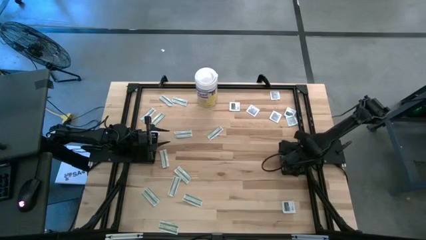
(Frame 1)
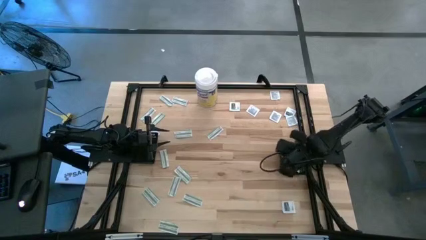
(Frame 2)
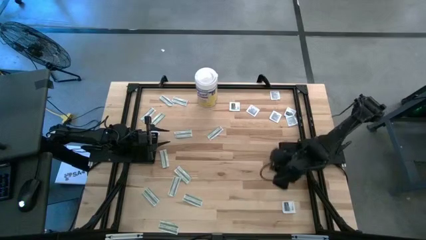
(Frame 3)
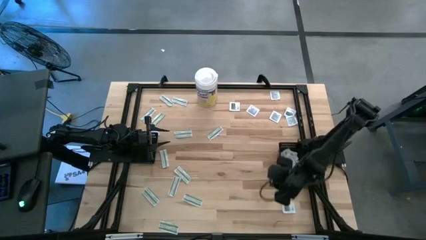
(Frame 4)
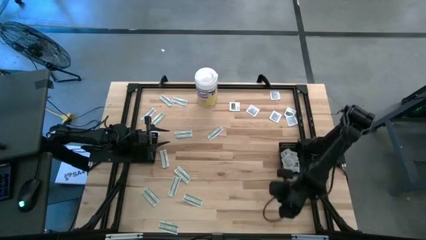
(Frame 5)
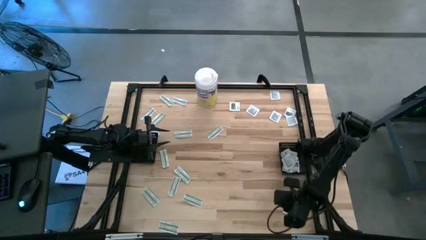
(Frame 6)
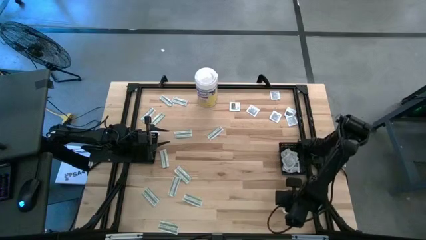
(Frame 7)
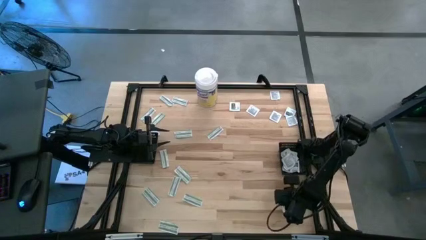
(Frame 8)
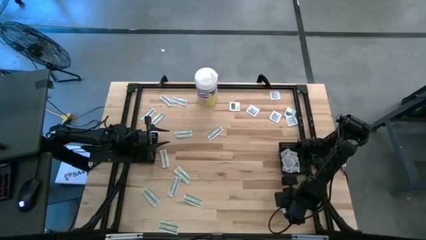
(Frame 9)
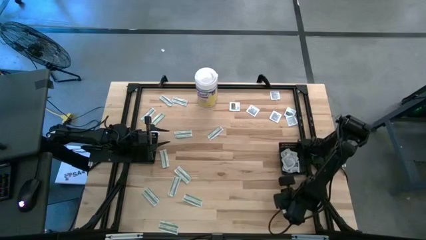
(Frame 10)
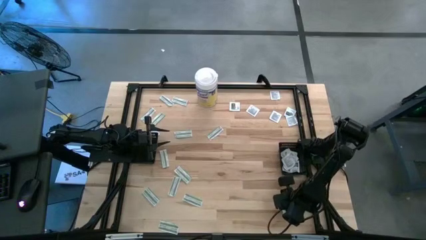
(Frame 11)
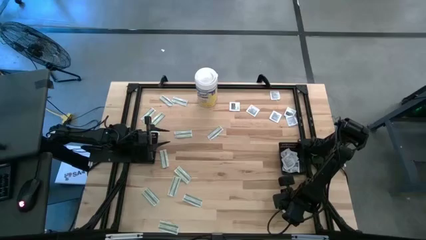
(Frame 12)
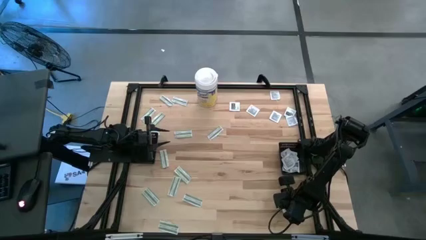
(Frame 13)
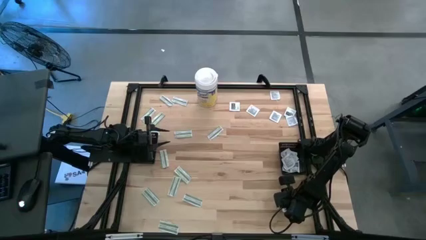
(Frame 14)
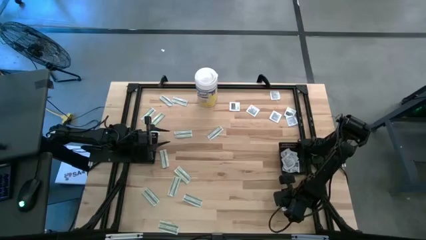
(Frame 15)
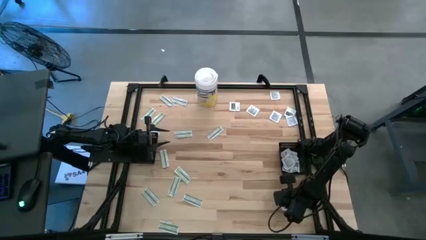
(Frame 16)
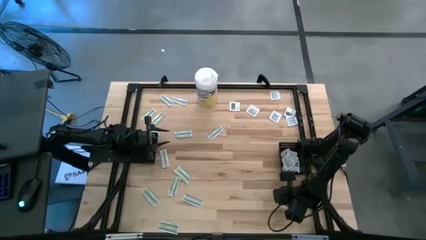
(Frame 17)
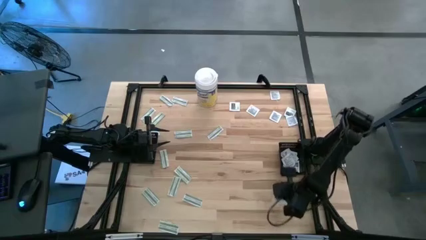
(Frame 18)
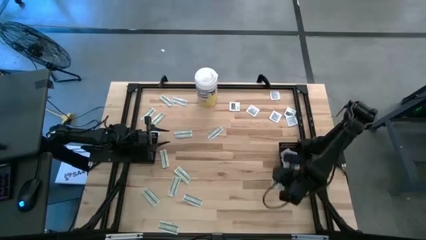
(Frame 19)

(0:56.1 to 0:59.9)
Task: Pick & Place First Aid Supplies
Put the towelette pack into the right black basket

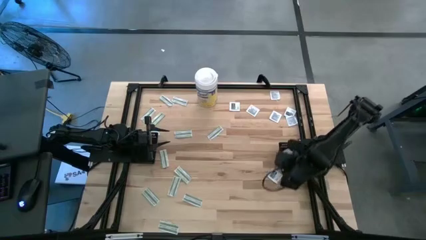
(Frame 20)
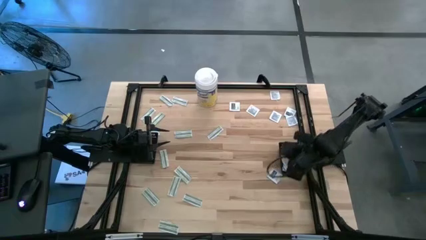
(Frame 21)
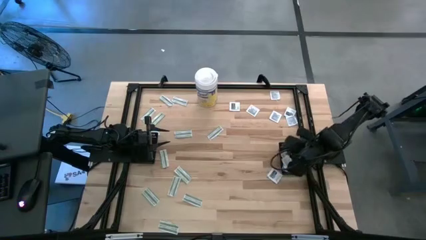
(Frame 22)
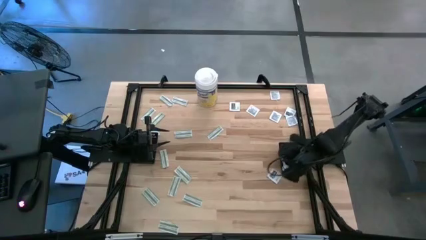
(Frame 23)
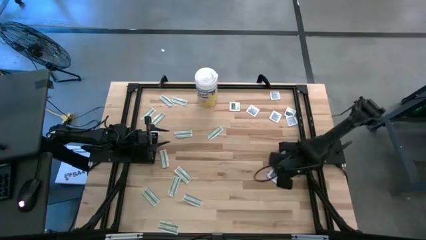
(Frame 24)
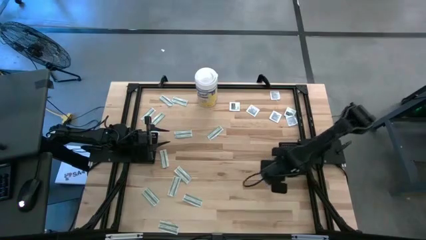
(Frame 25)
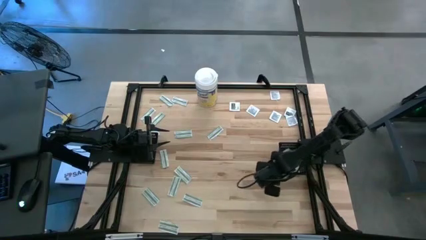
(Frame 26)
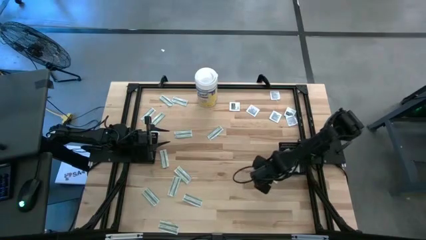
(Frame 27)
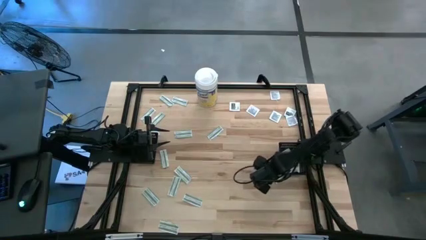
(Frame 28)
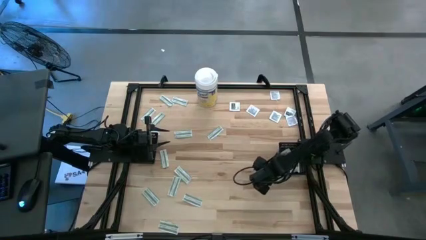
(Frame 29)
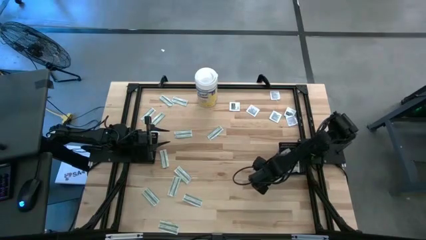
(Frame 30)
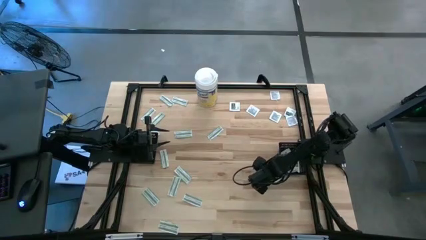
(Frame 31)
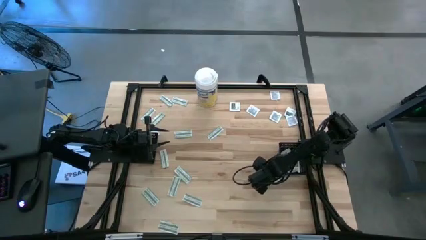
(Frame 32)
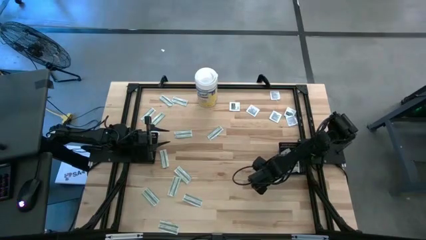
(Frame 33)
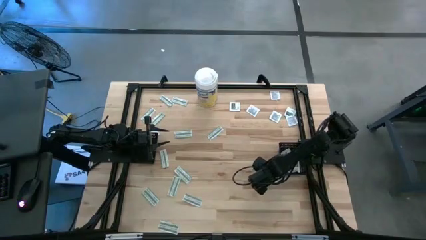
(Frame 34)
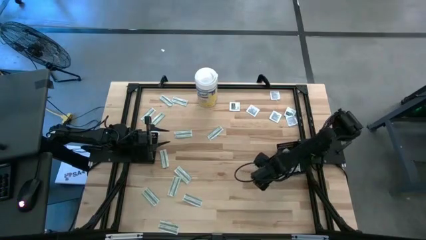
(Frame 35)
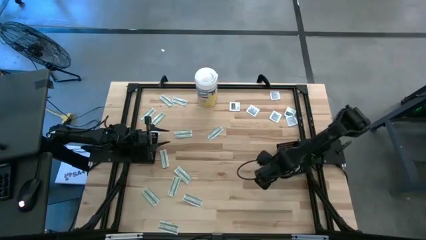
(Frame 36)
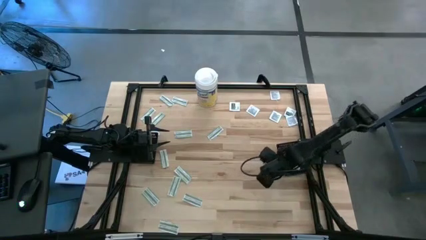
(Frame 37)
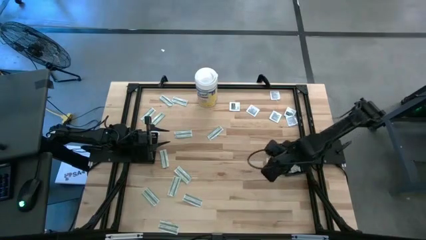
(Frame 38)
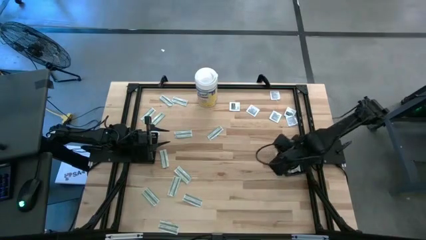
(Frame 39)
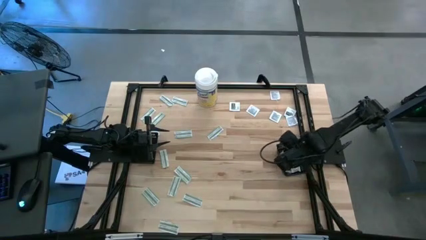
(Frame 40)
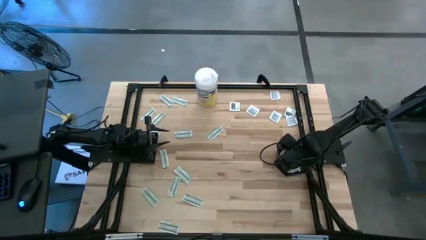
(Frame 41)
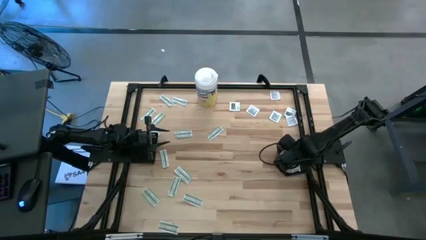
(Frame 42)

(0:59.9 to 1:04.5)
Put the towelette pack into the right black basket

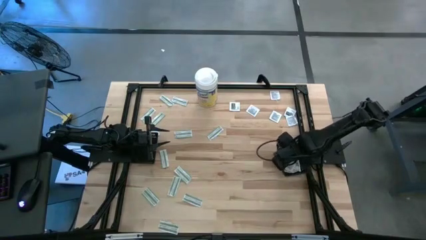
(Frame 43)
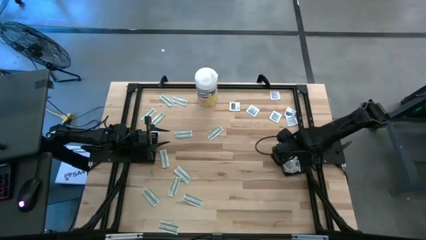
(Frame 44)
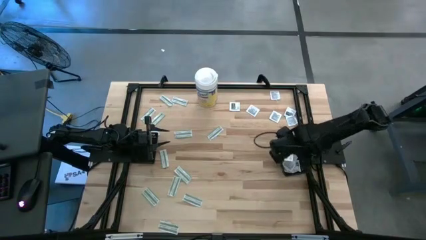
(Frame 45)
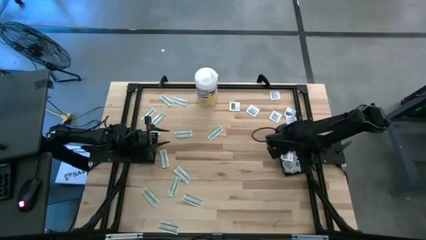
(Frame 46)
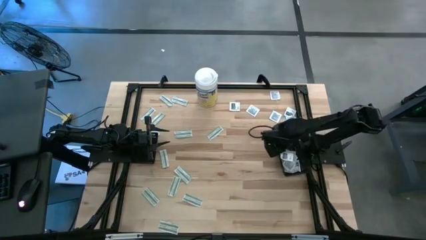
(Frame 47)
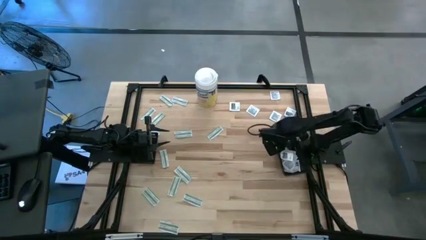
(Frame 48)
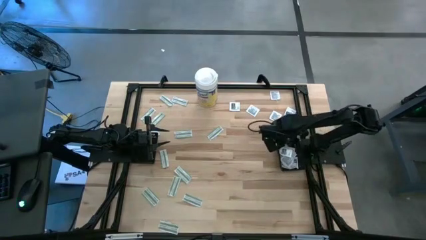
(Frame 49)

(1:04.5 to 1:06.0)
Adjust the right black bin

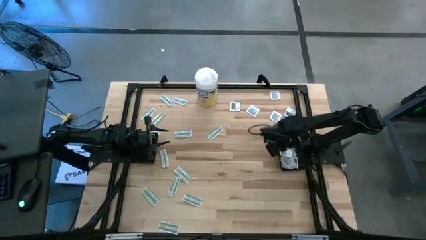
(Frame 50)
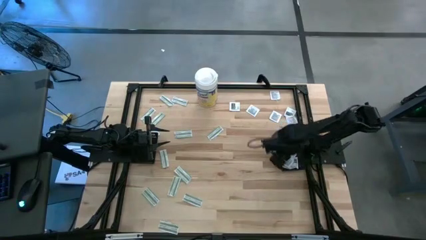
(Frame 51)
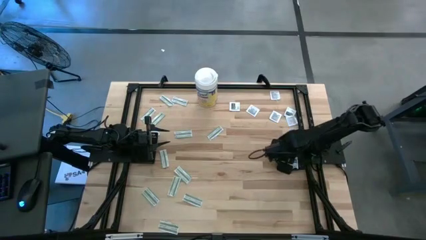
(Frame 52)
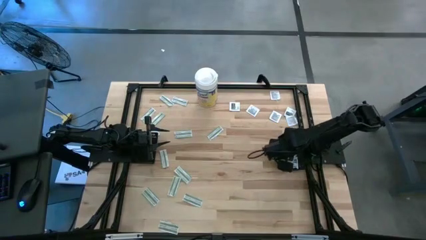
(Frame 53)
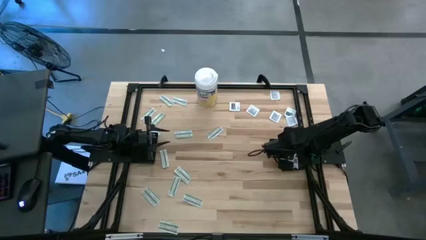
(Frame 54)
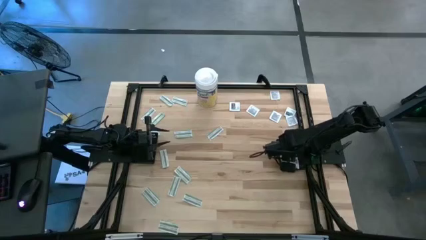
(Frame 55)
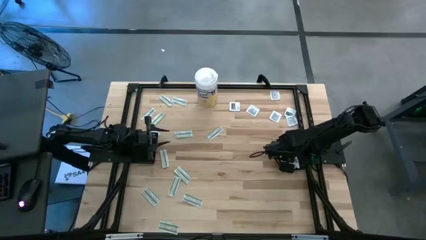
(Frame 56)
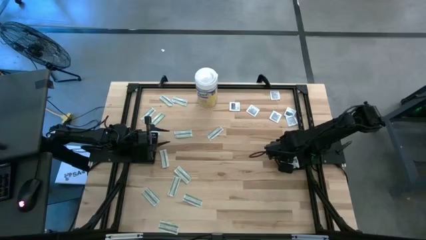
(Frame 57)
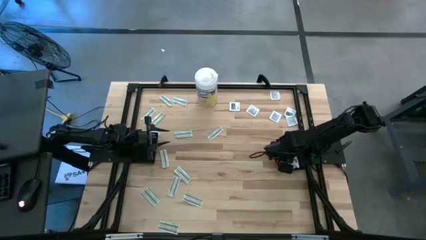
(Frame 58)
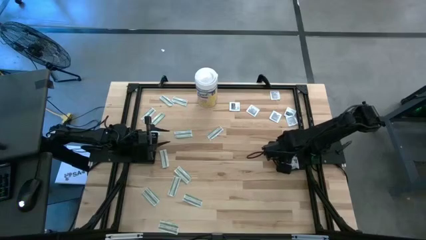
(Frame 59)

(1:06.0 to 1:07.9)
Adjust the towelette pack

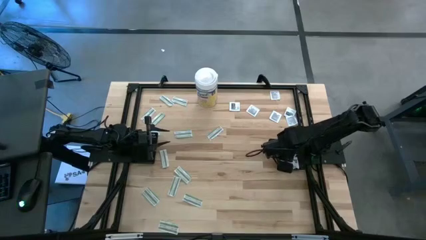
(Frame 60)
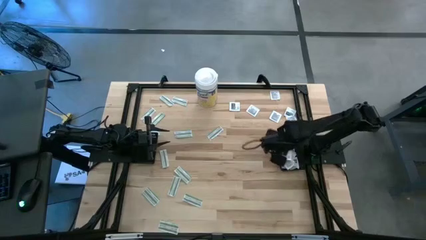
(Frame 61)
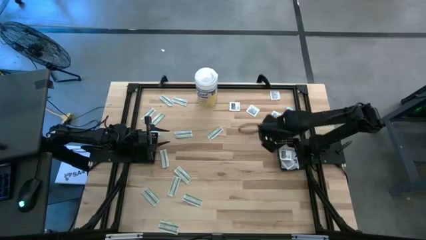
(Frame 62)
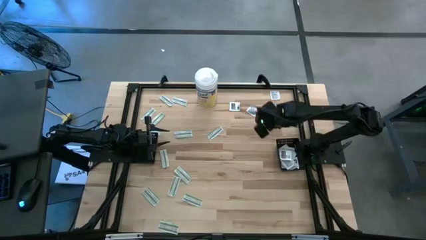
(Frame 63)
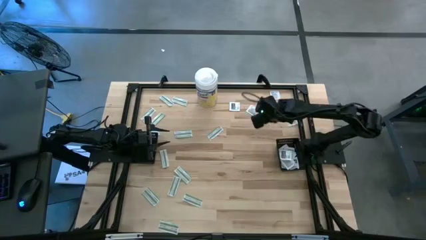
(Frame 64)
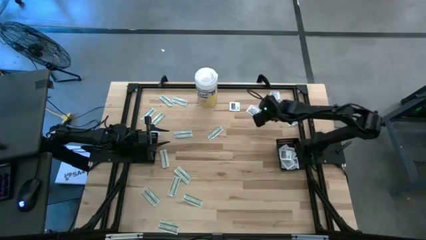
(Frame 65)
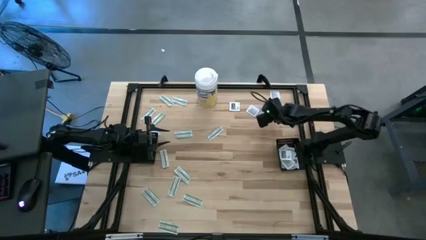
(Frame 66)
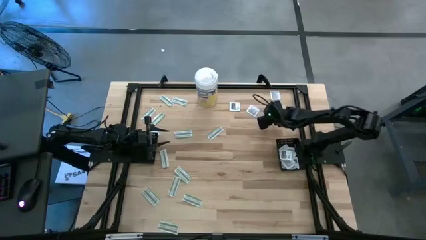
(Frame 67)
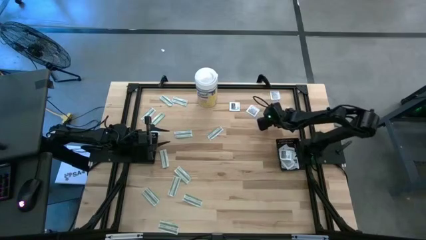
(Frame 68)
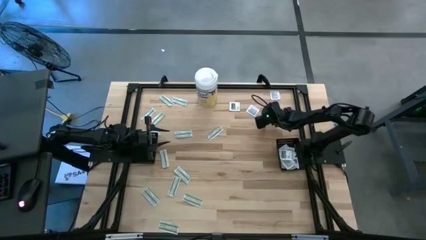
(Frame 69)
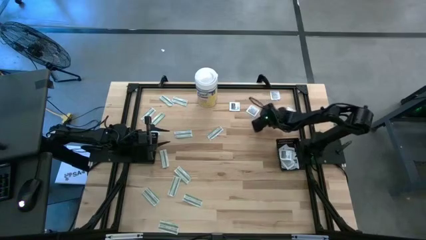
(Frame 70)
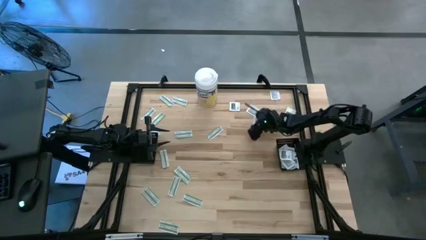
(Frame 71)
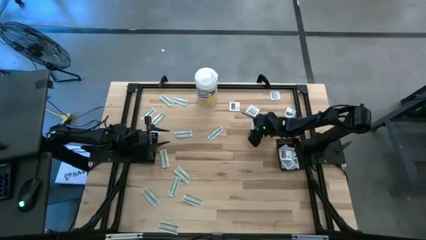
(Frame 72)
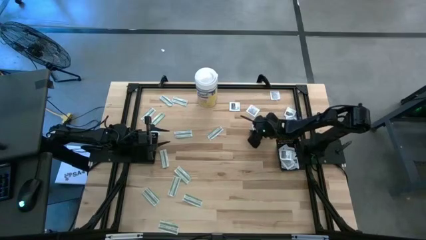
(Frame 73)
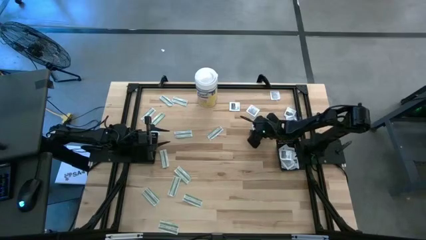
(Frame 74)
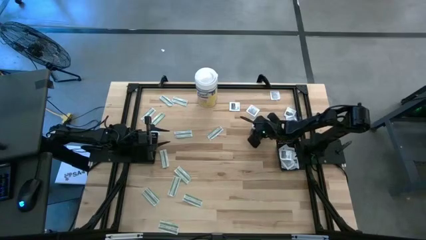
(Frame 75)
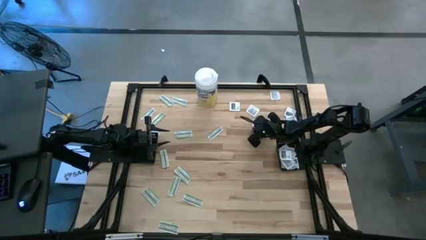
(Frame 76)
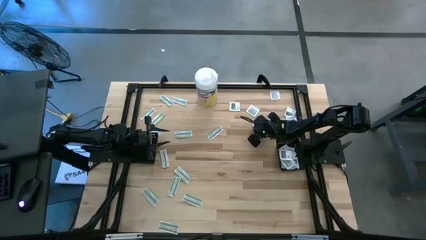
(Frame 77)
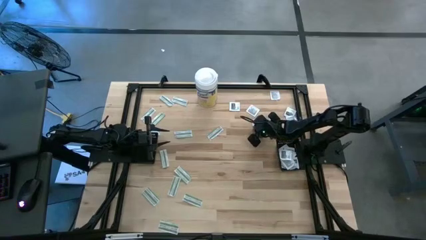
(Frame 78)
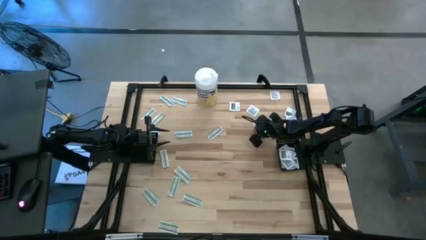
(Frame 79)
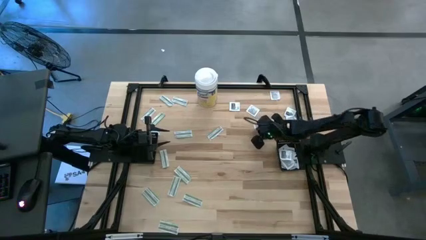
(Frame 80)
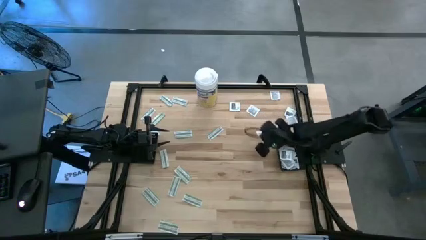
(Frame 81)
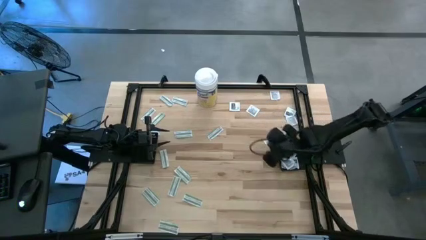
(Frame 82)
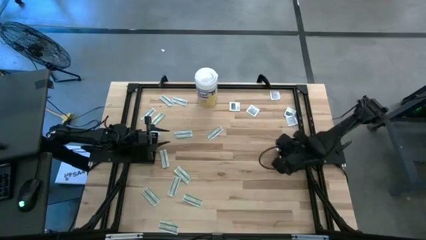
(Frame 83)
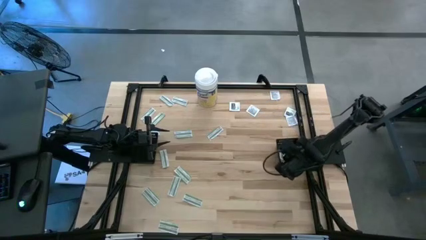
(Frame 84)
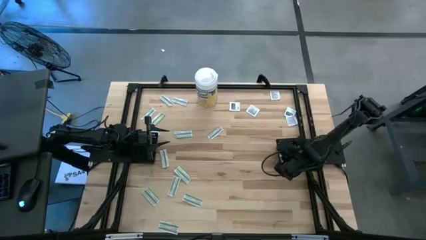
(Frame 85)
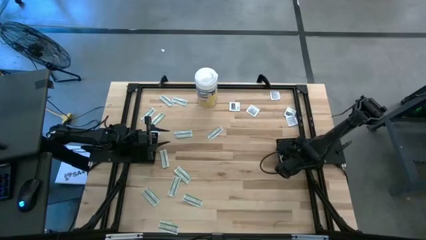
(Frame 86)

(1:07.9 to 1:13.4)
Put the towelette pack into the right black basket
